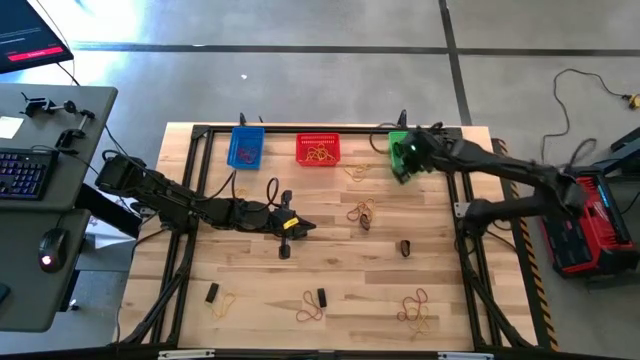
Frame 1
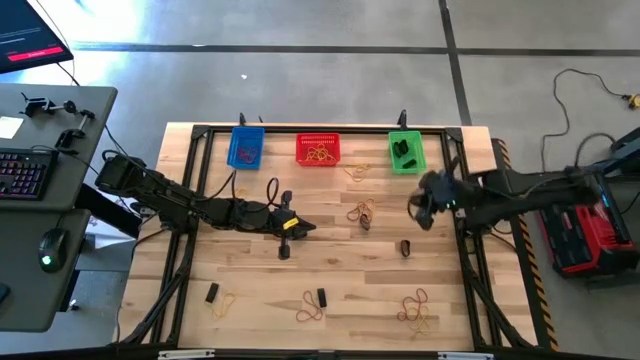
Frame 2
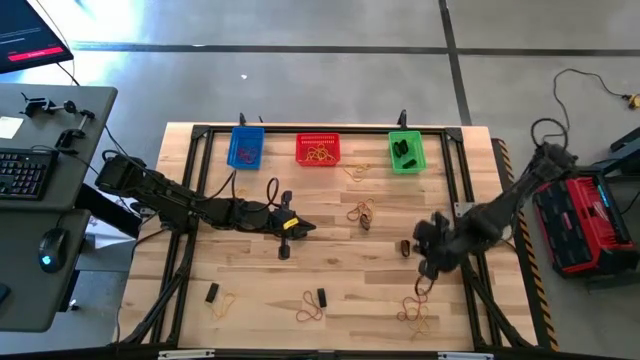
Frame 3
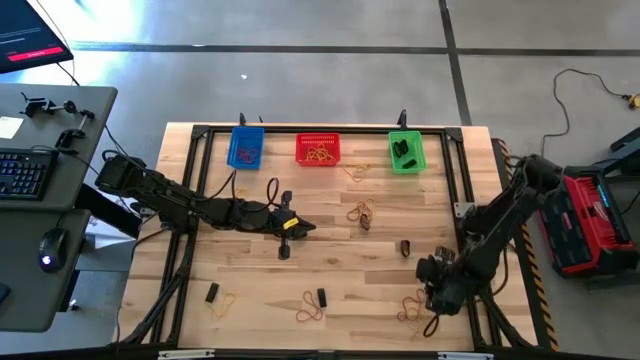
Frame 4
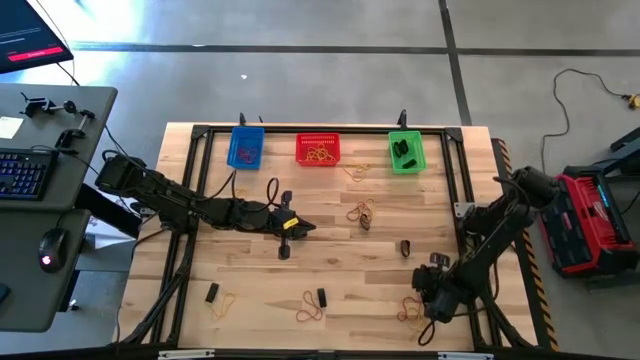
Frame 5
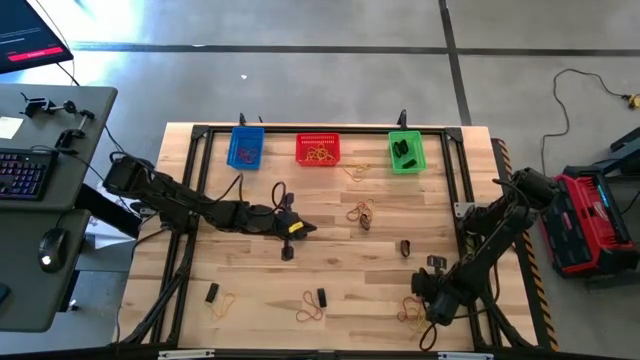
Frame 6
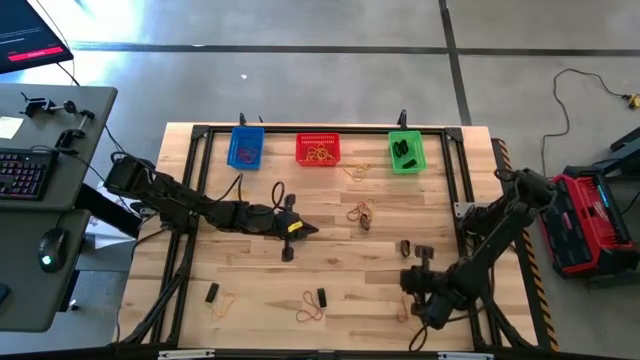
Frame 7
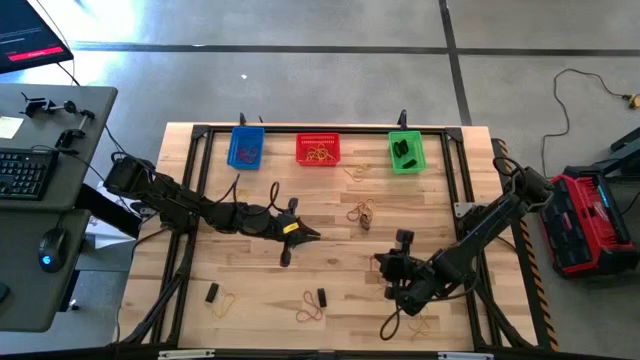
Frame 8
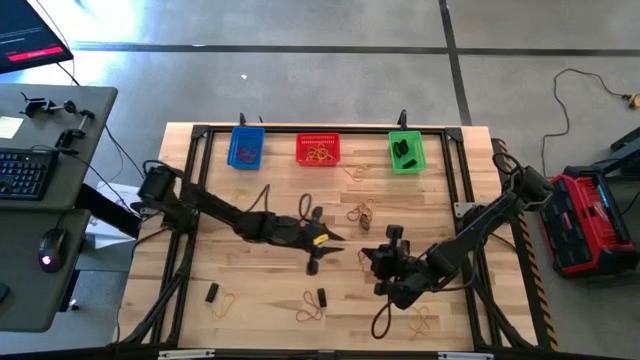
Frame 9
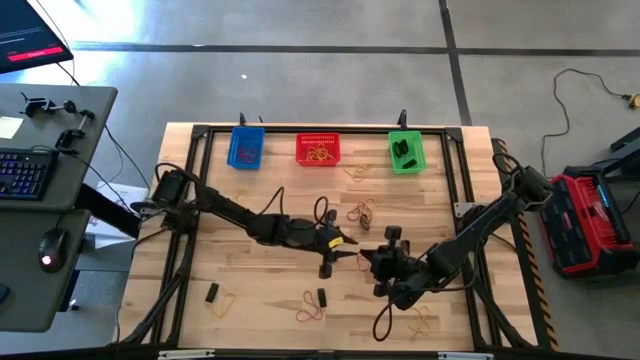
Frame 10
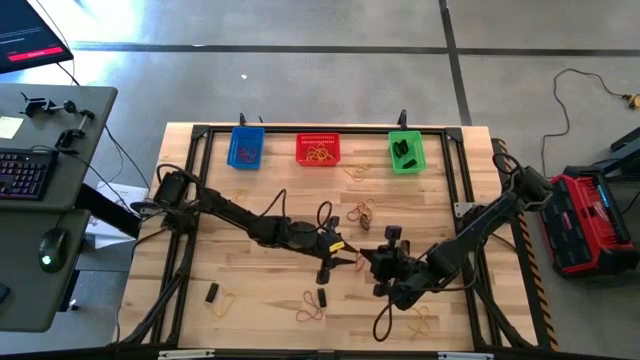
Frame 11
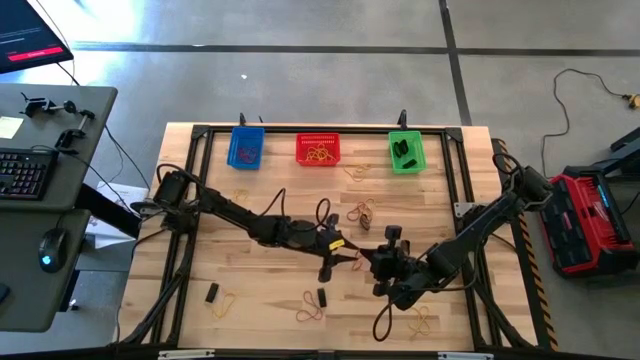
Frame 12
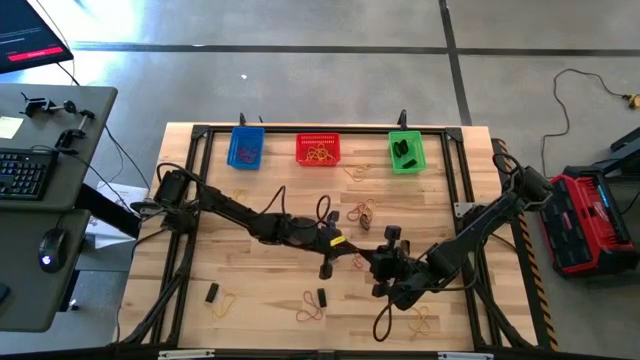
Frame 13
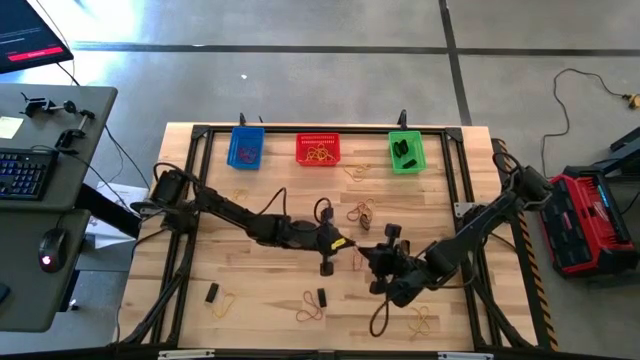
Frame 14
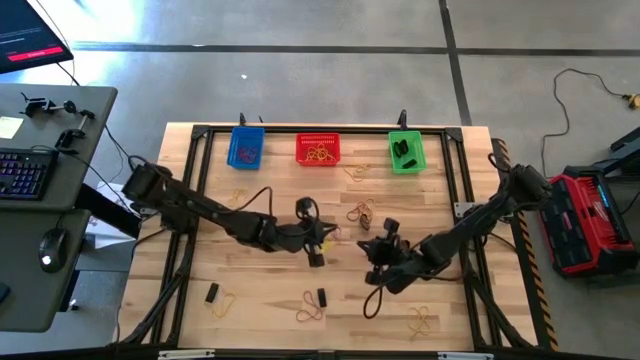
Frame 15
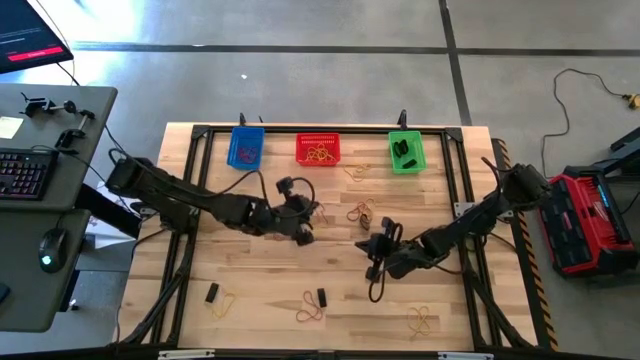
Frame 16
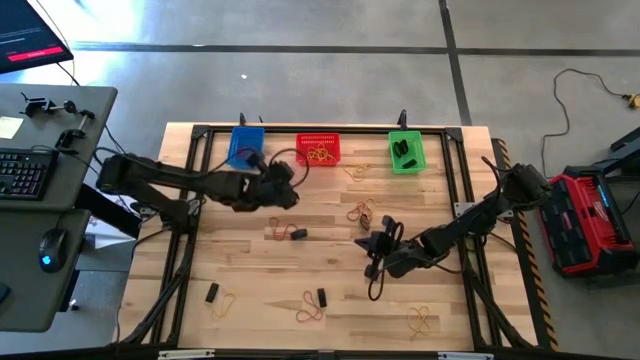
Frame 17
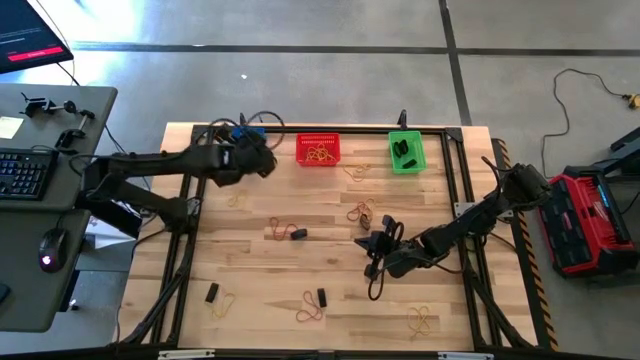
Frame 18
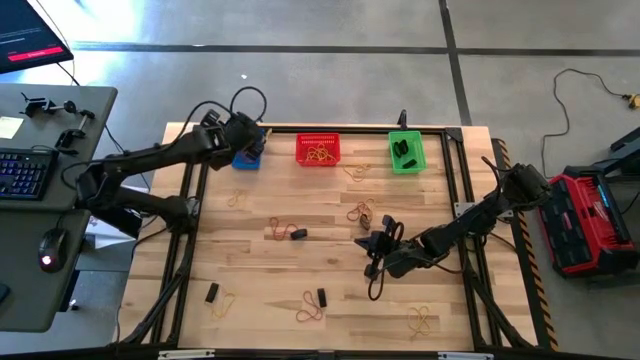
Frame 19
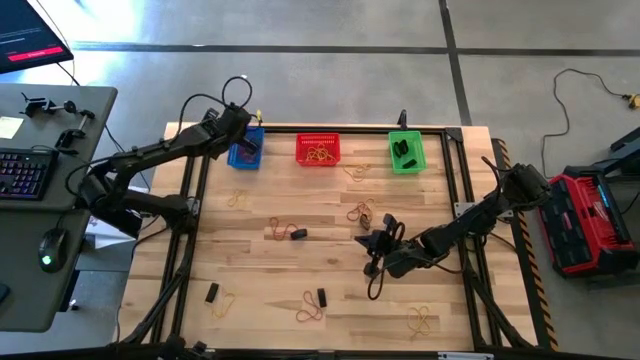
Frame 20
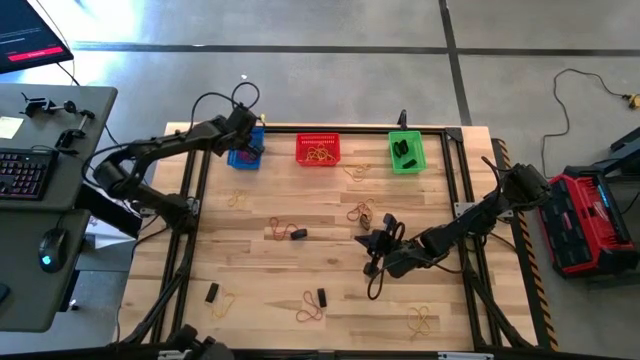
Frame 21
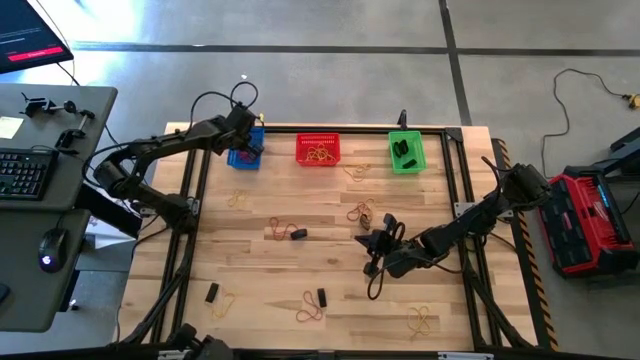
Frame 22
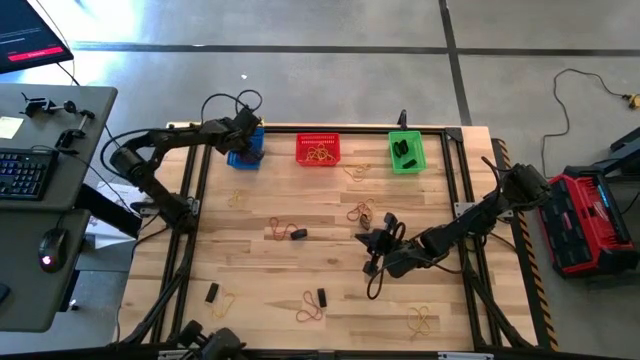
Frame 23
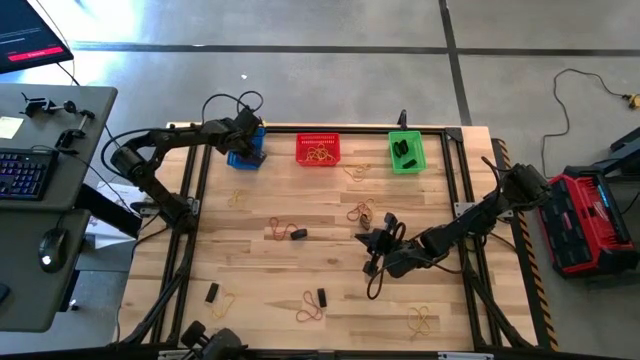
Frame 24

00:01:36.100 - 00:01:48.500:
Task: Sort rubber bands into baskets
Put the orange rubberband into the blue bin

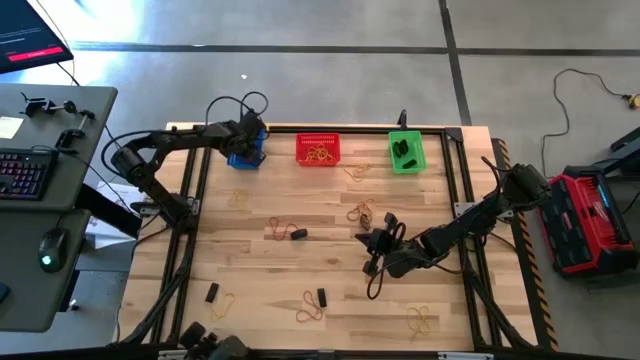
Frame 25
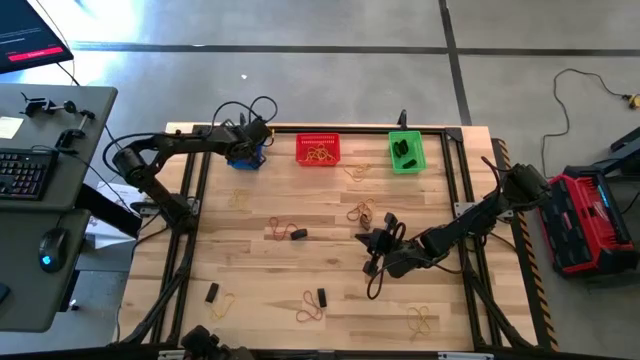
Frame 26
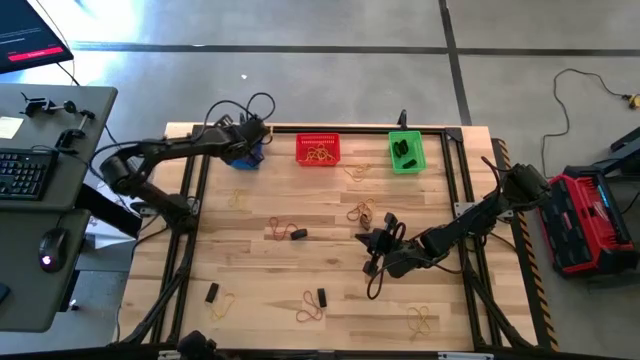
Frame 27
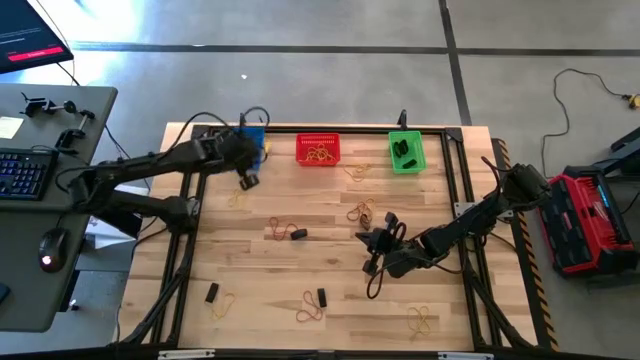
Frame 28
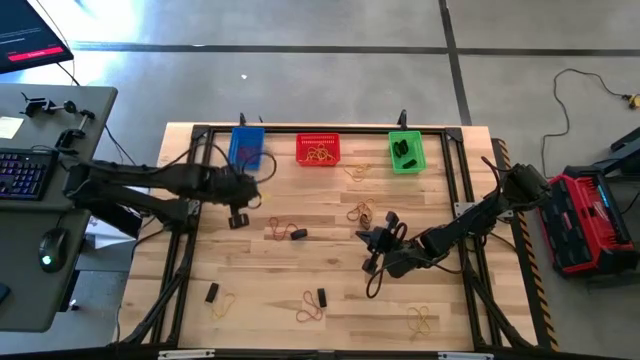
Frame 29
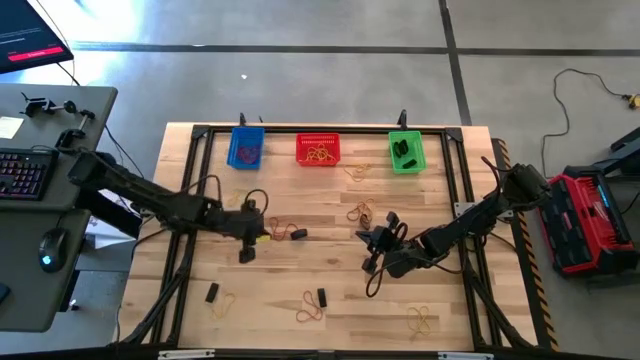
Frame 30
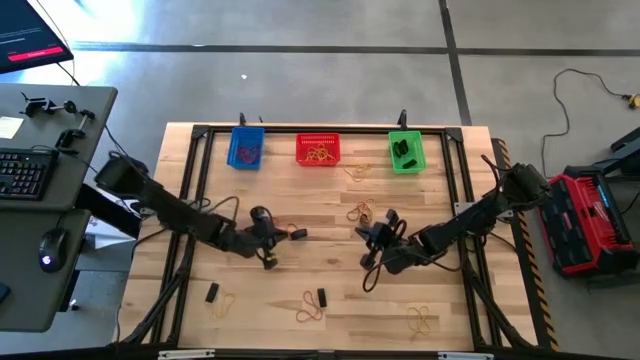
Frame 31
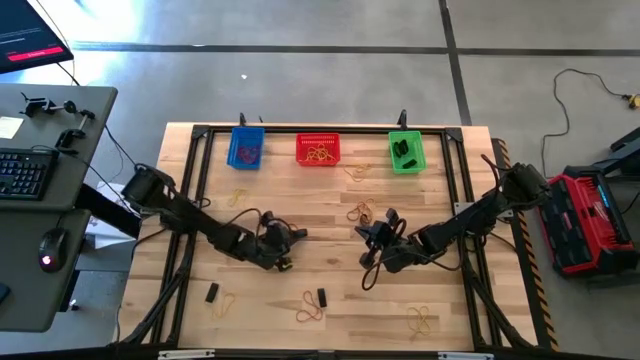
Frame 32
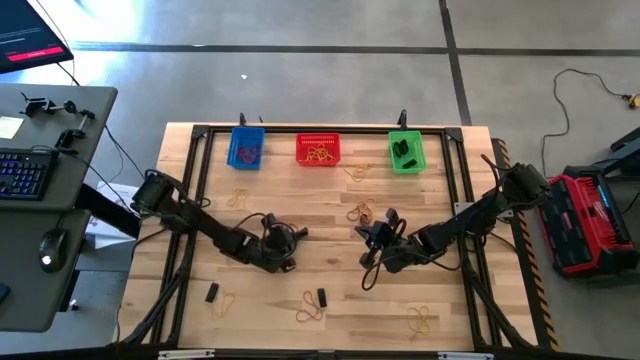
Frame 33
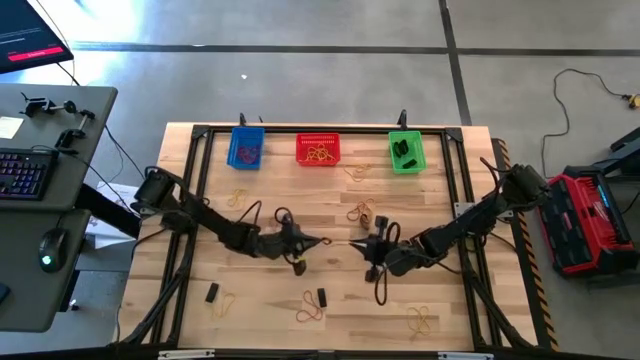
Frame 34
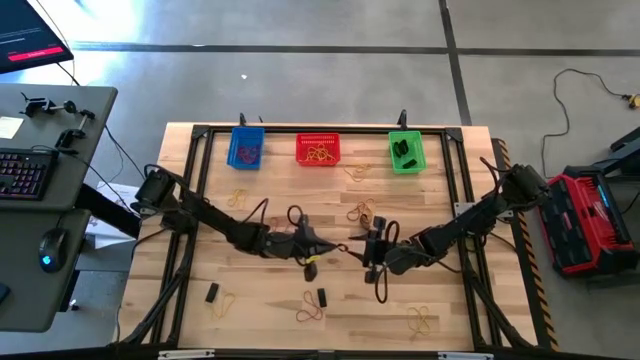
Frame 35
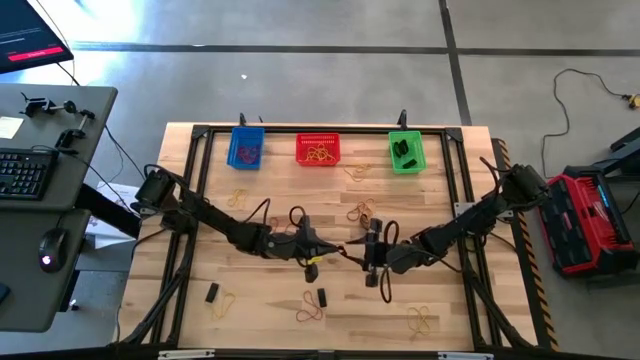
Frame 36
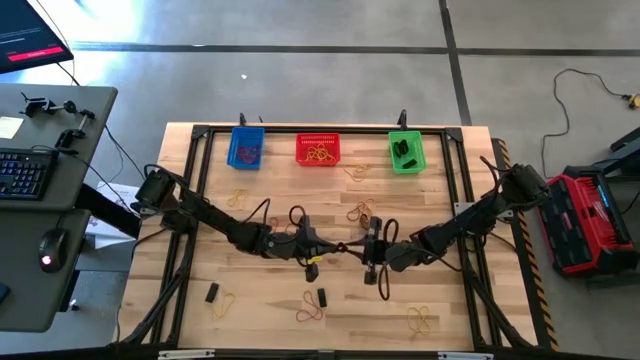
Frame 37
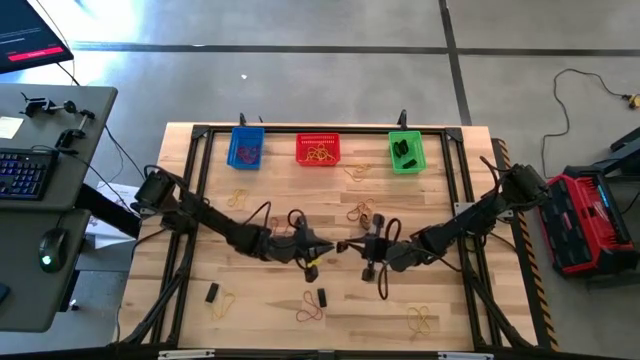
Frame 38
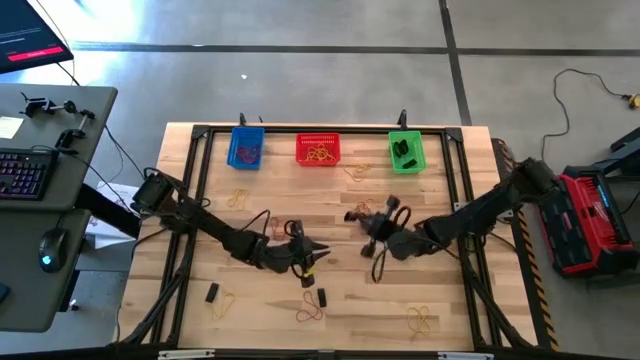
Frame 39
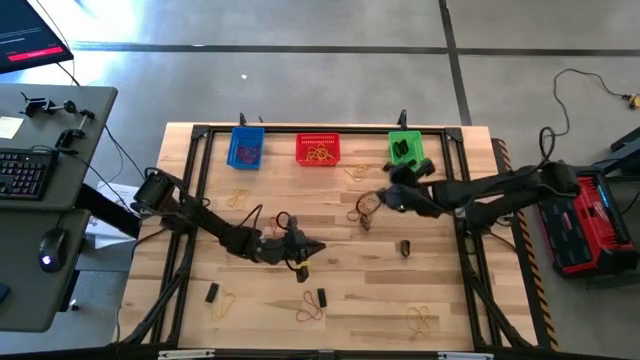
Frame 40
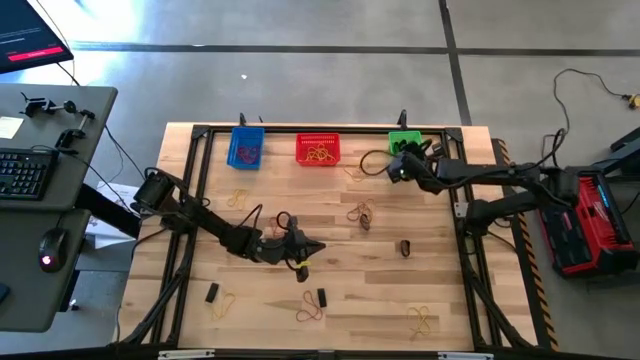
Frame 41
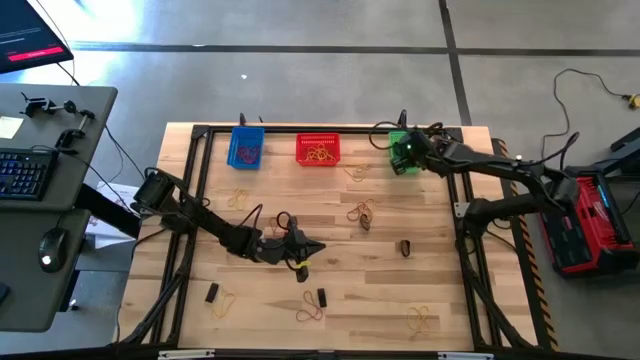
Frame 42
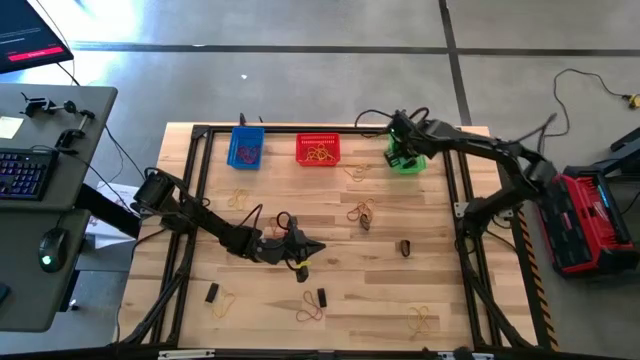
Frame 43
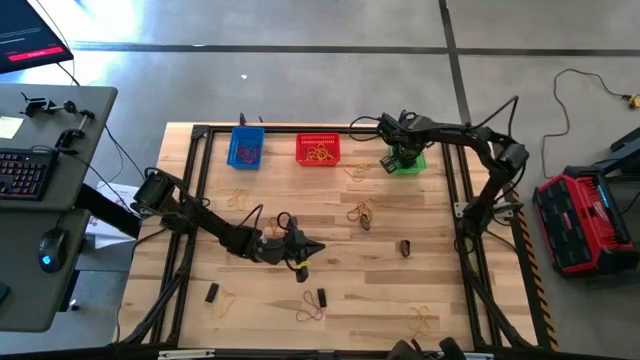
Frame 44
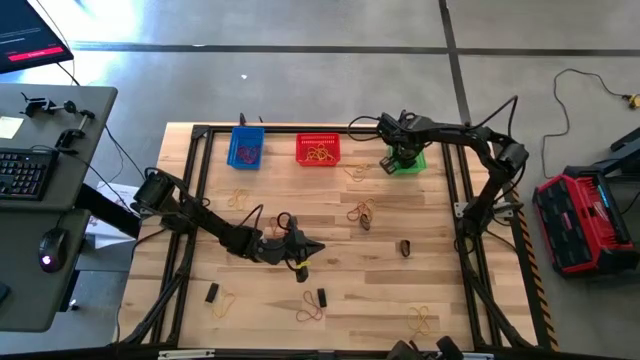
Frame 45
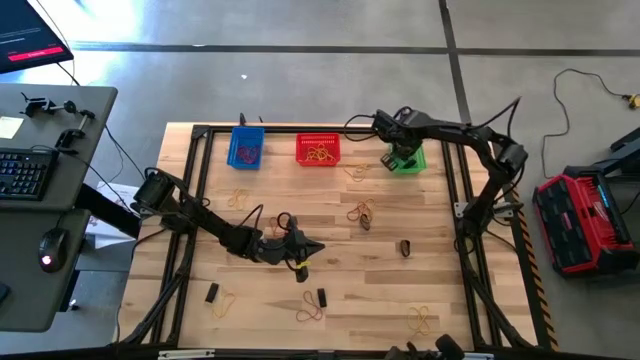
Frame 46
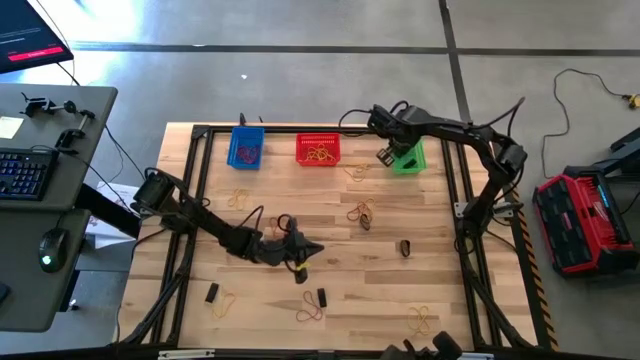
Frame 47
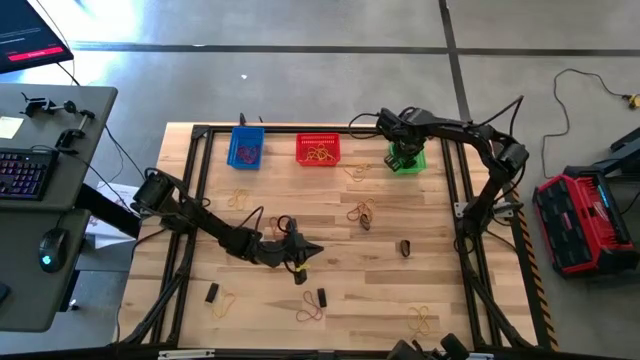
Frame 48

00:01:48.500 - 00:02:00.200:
Put the black rubberband into the green bin
